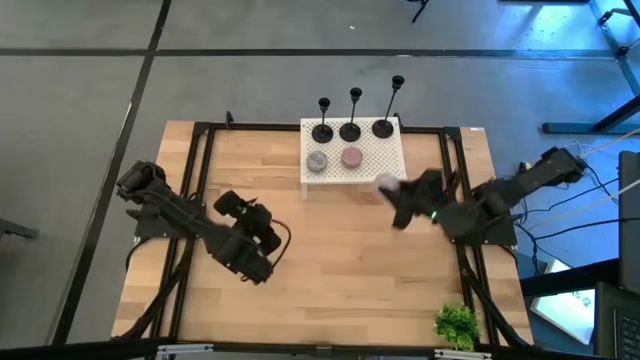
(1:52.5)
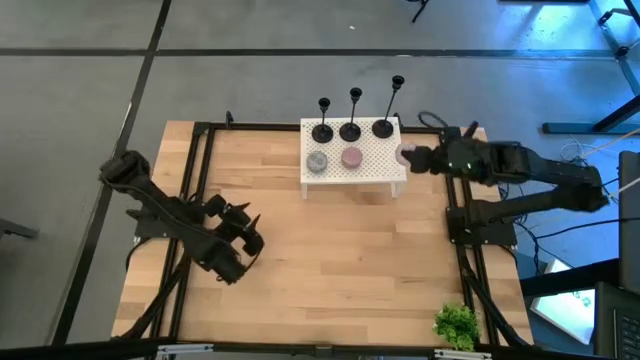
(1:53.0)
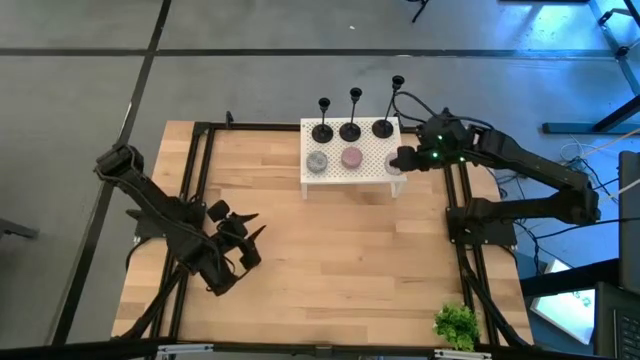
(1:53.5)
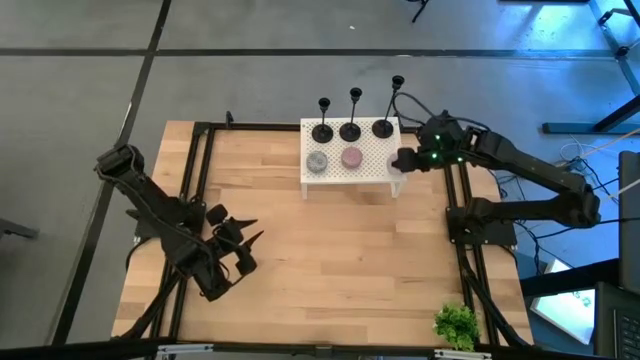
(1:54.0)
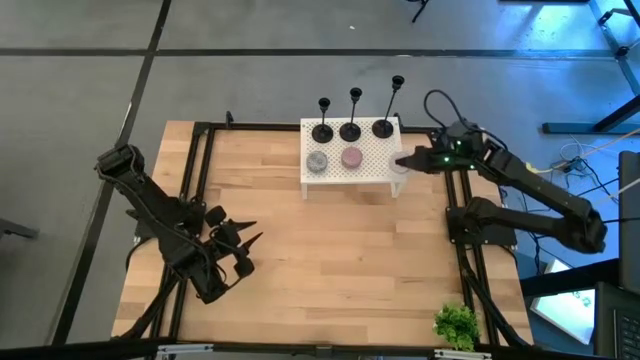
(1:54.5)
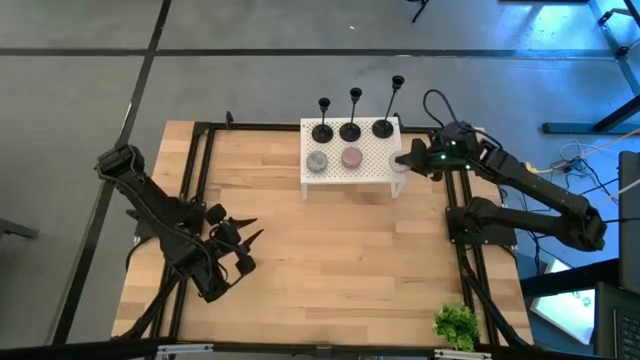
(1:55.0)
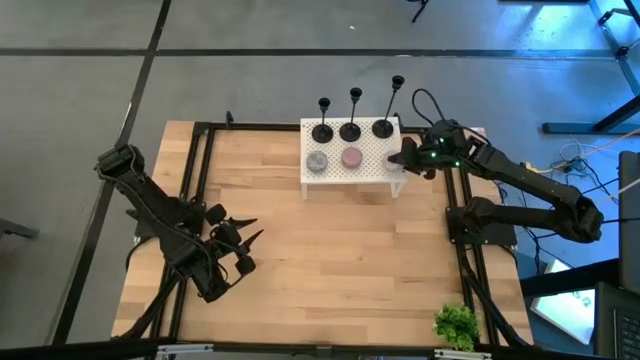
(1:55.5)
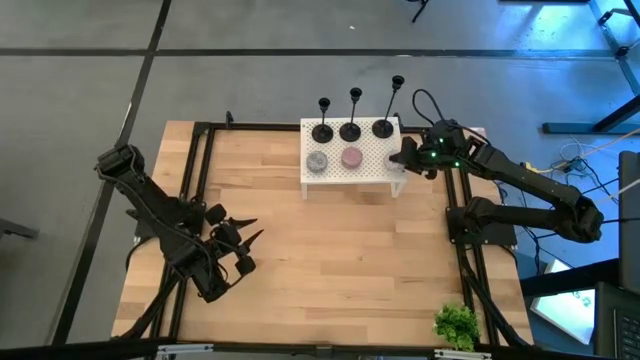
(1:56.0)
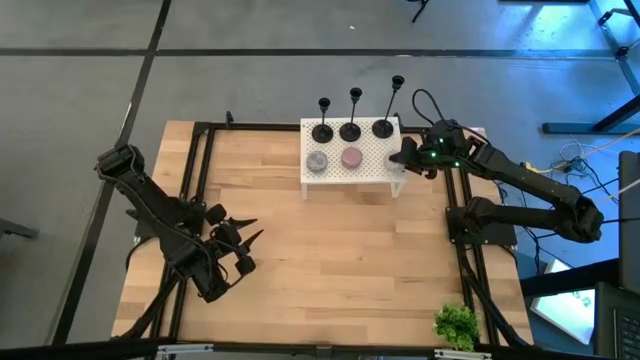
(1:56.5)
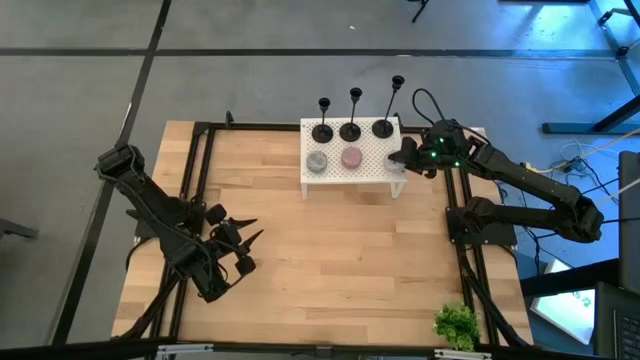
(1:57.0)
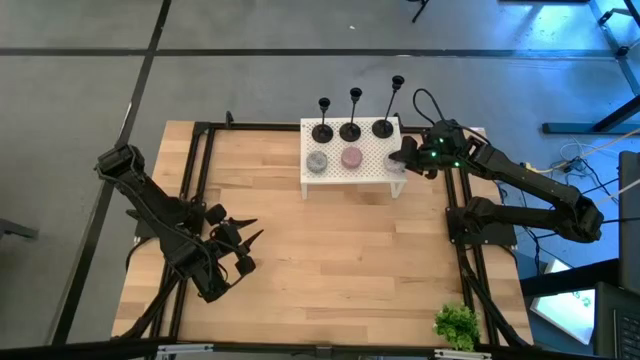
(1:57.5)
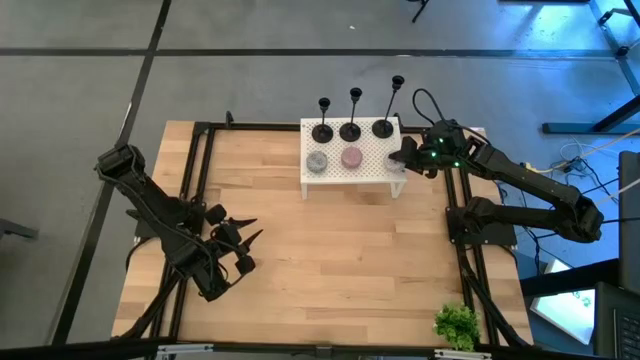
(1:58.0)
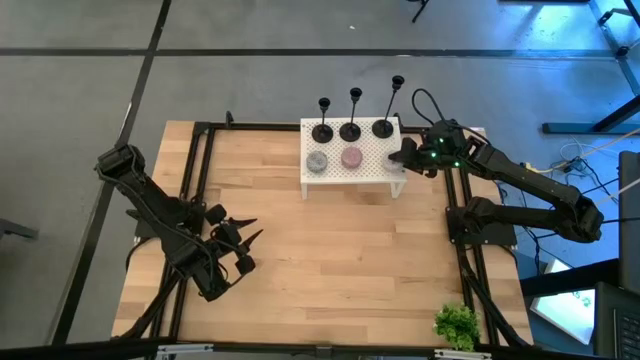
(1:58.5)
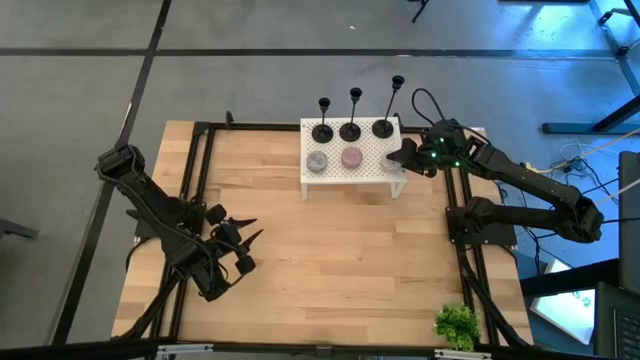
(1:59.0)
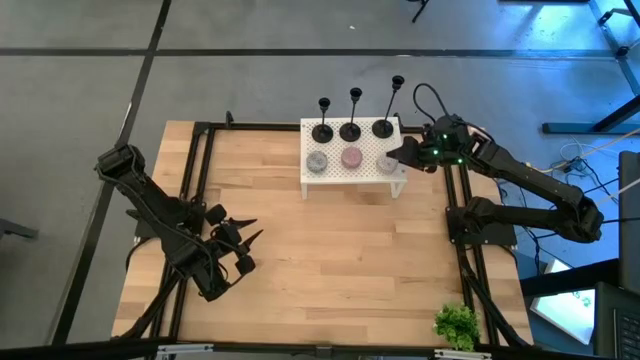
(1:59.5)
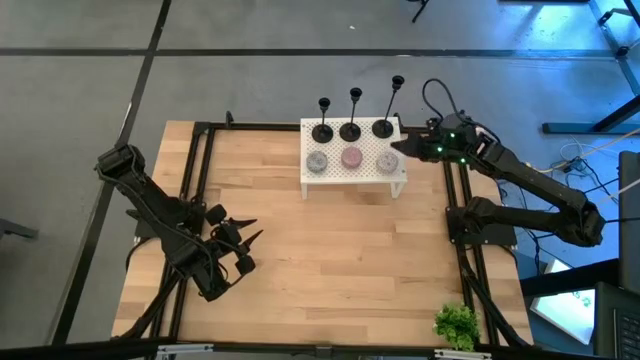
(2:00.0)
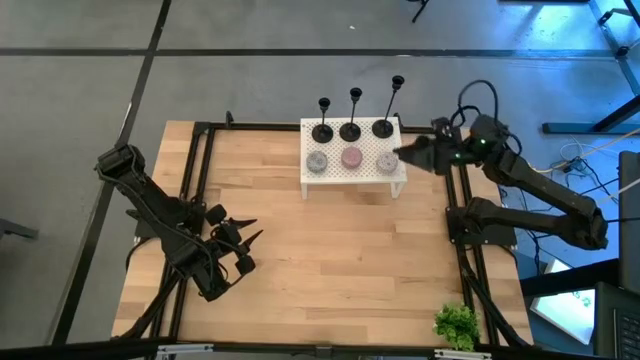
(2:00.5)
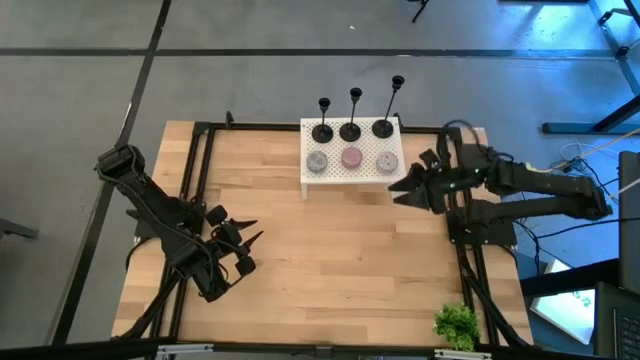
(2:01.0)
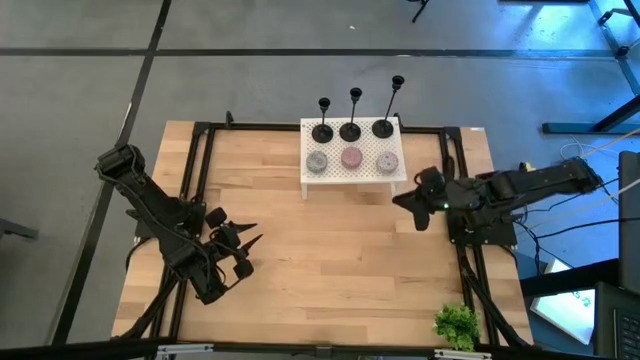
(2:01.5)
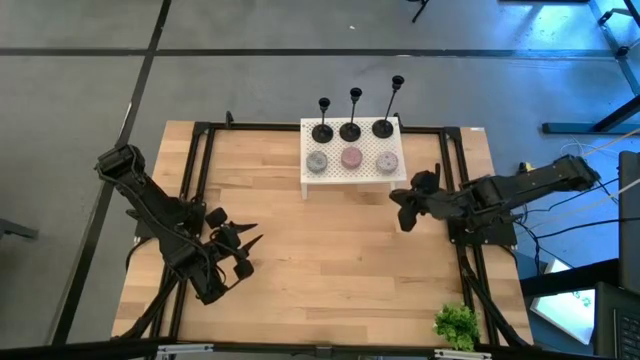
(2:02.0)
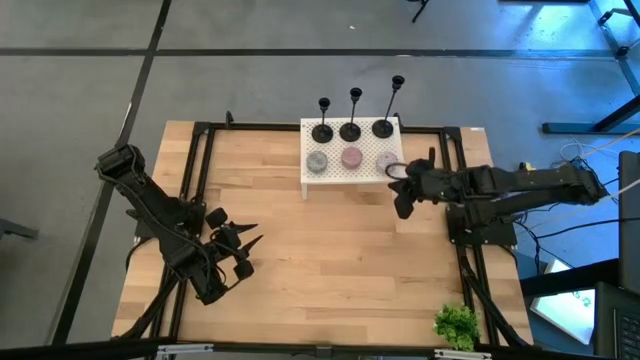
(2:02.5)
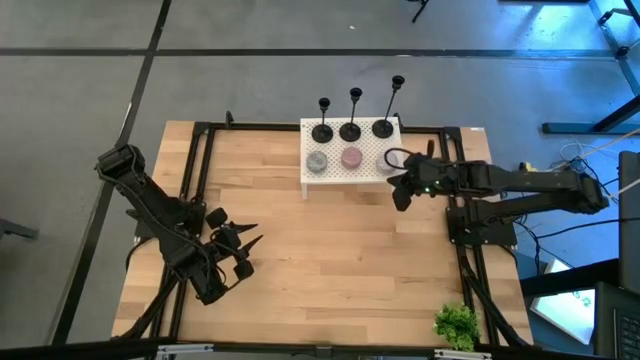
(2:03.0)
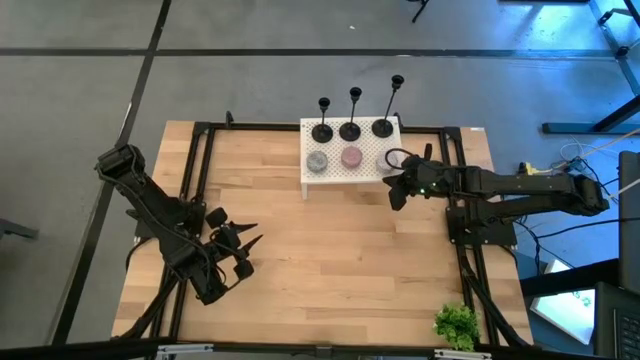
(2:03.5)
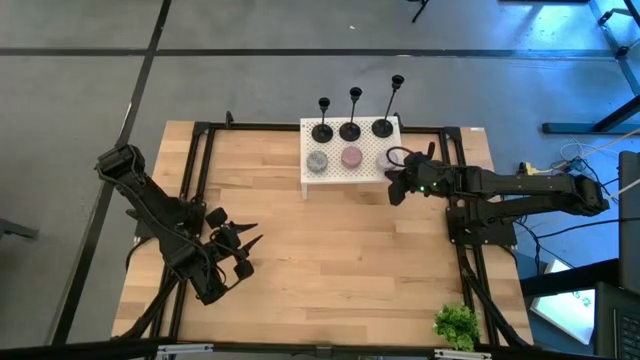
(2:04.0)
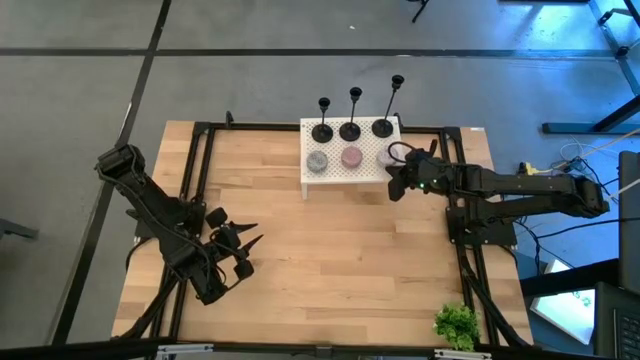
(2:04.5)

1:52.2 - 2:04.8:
Task: Pick & Place candle stick holders
Put the red scented candle on the shelf aligned with the other scented candle

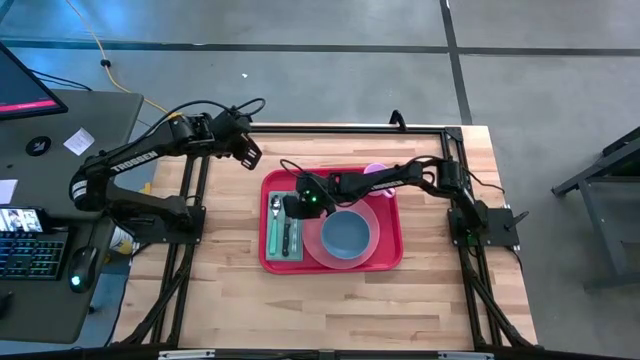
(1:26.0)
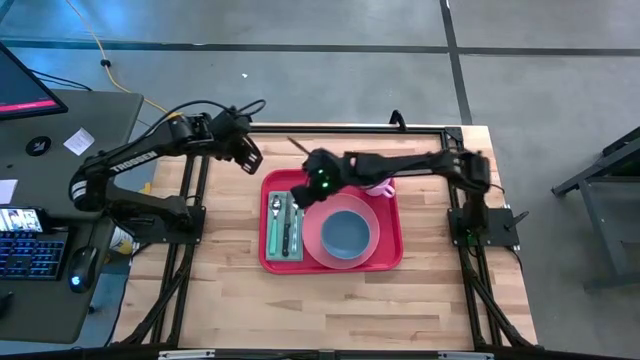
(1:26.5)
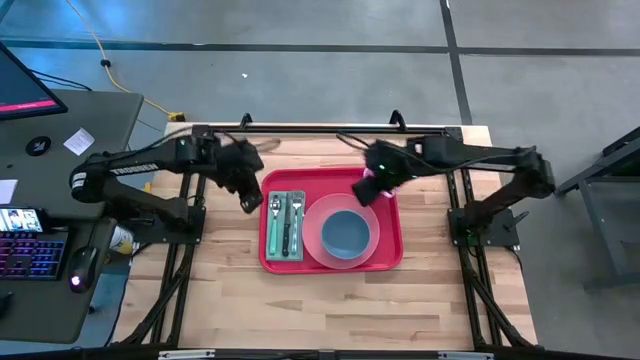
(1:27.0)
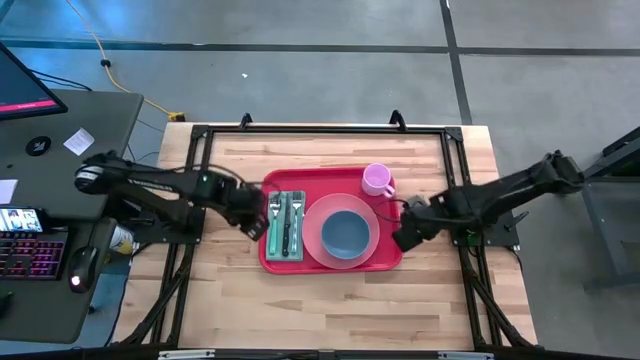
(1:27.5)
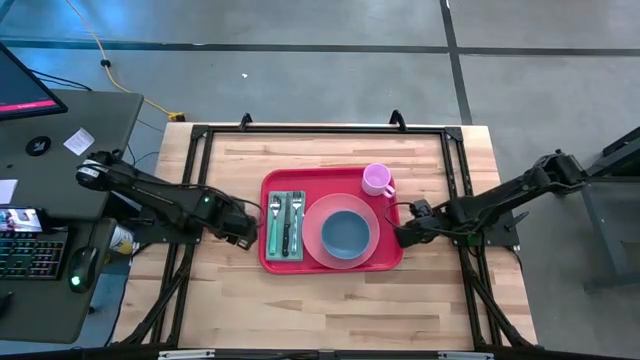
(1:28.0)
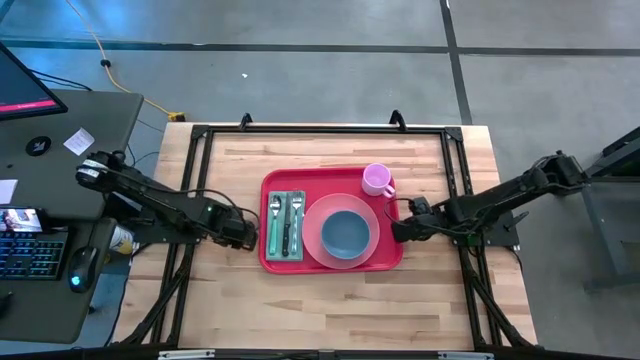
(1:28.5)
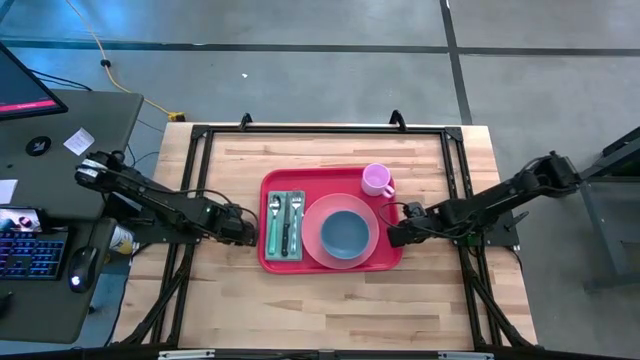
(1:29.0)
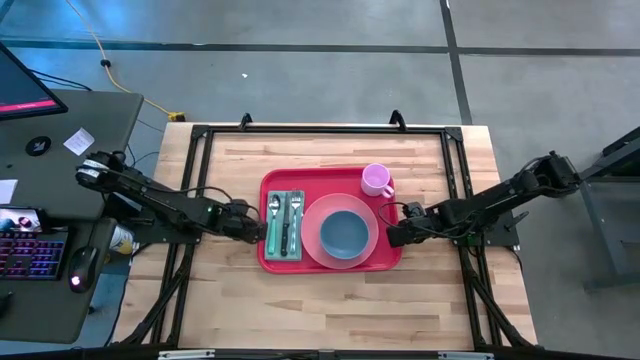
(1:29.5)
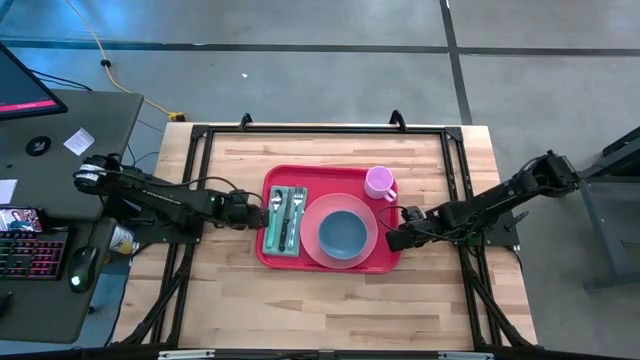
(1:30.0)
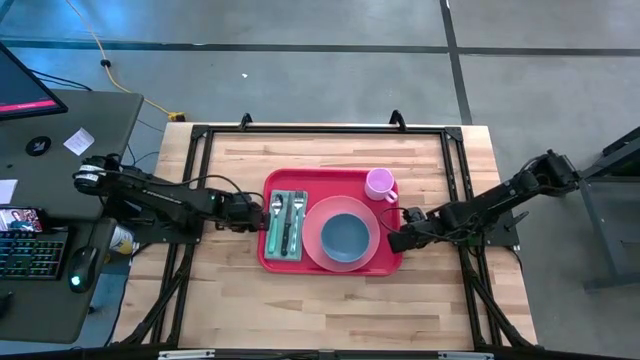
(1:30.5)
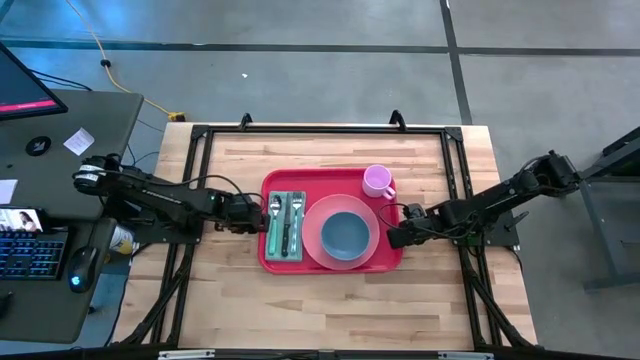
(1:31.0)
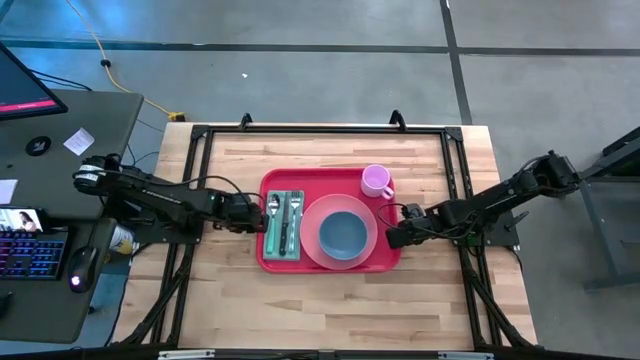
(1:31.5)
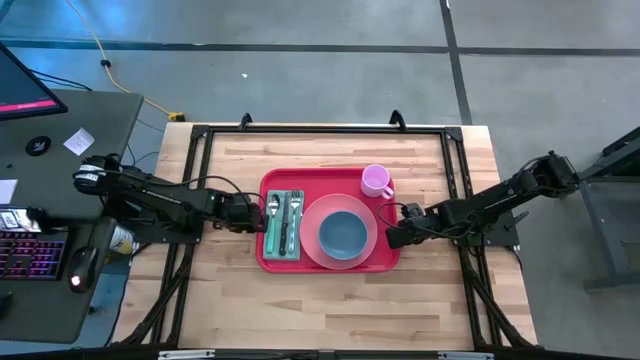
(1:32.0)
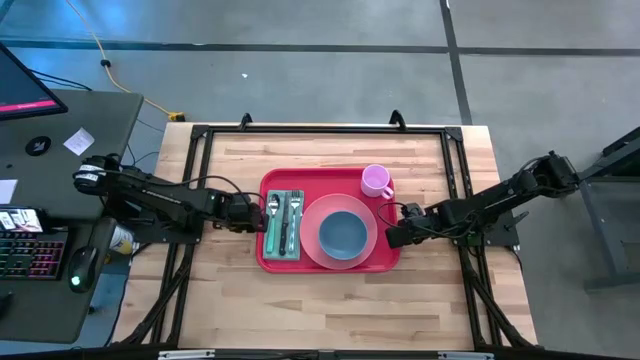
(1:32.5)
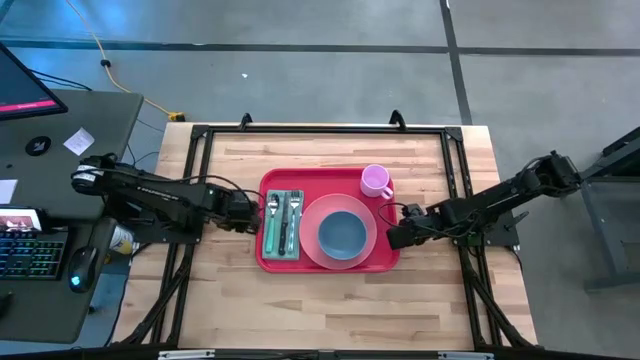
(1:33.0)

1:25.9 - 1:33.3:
Task: Set up tray
Adjust the red tray
